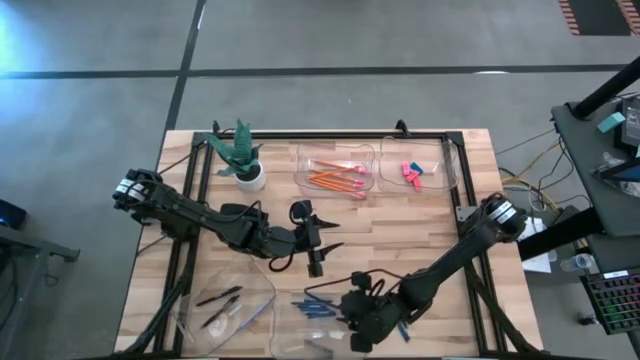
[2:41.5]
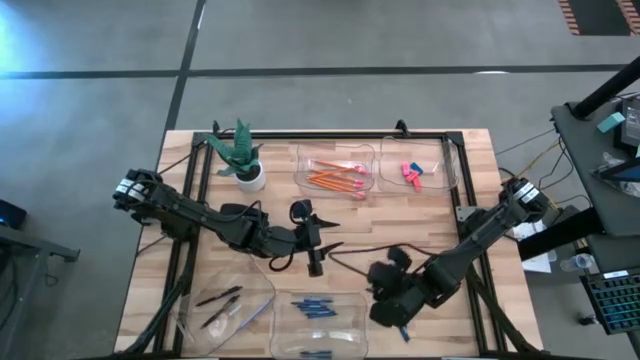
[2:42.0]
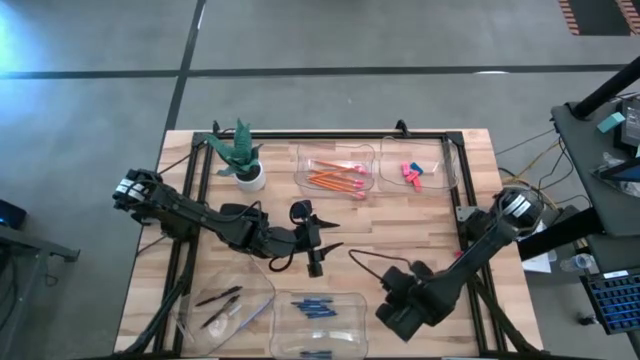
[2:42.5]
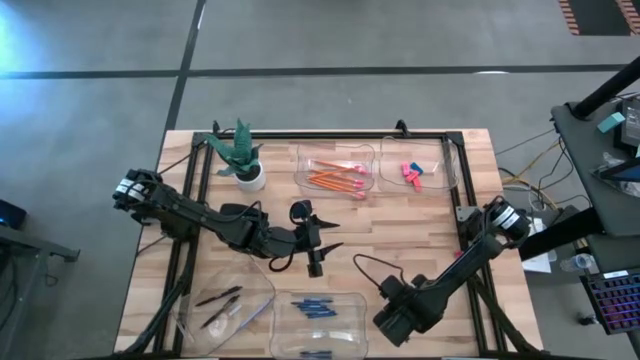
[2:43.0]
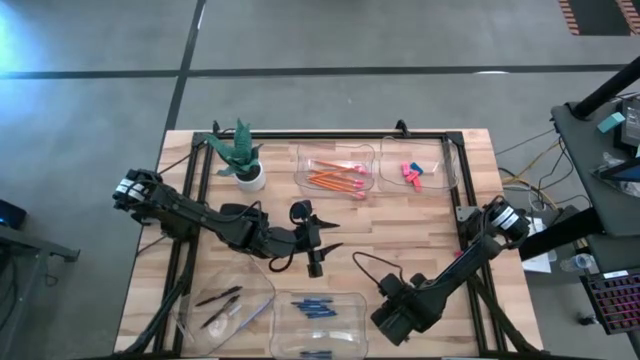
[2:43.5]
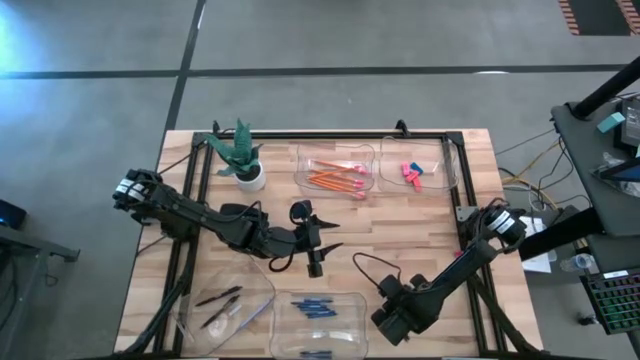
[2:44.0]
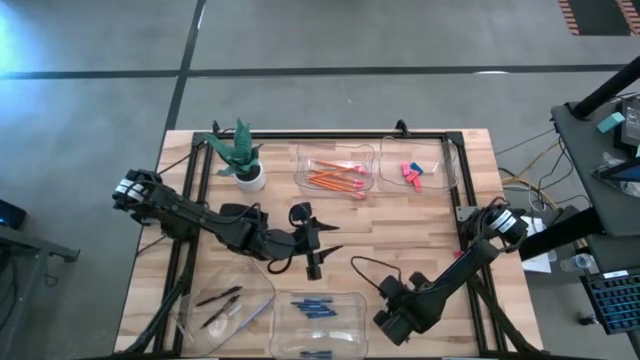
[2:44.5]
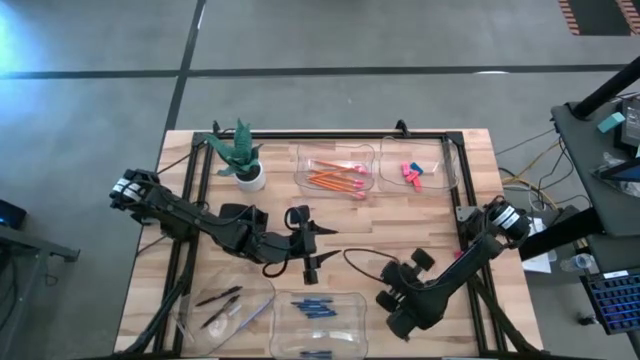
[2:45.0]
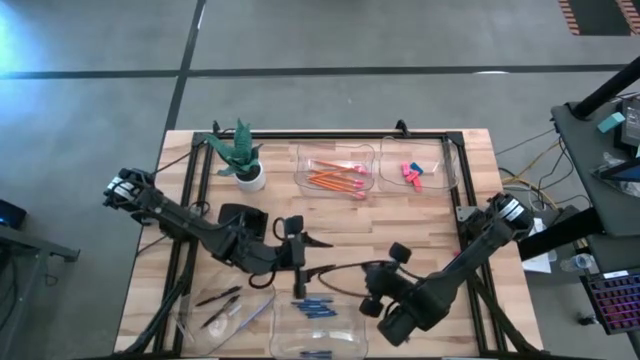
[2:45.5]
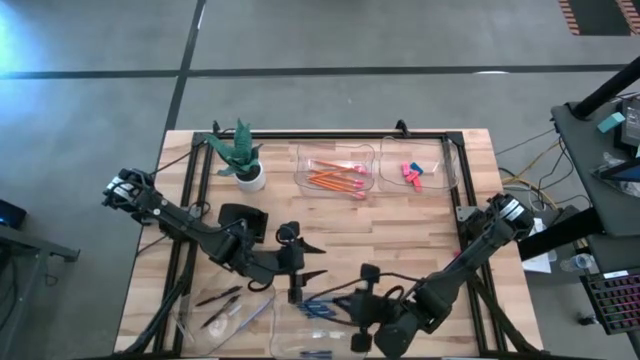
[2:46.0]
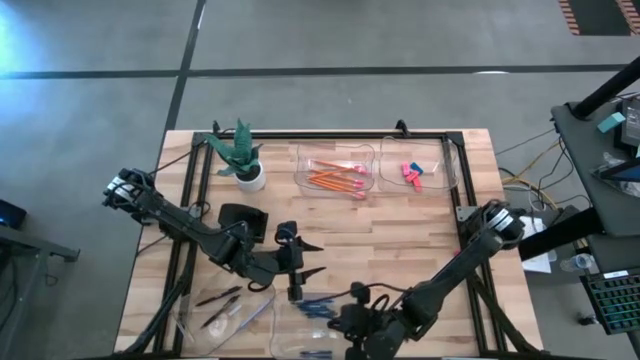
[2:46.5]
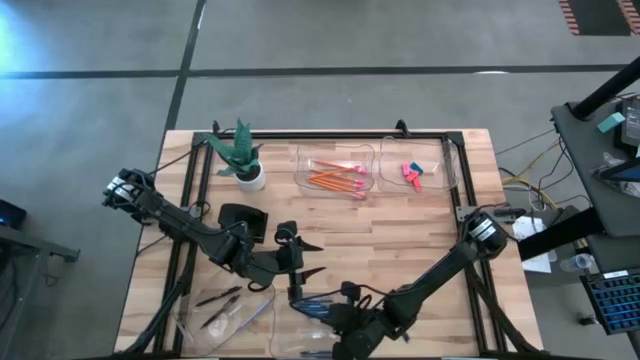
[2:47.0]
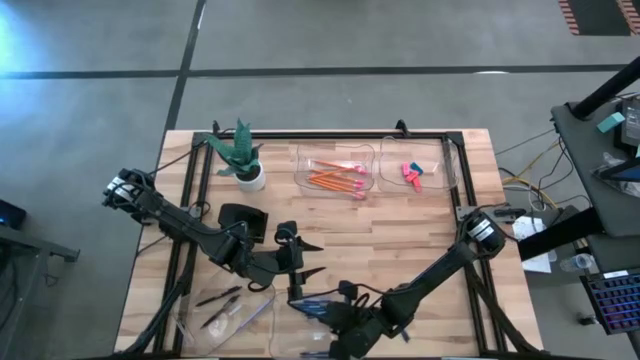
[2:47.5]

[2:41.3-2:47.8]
Task: Sort crayons/erasers/pens/pencils in bins
Put the blue crayon into the bottom right transparent bin

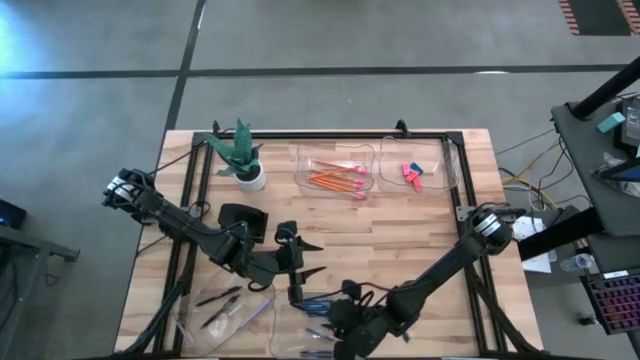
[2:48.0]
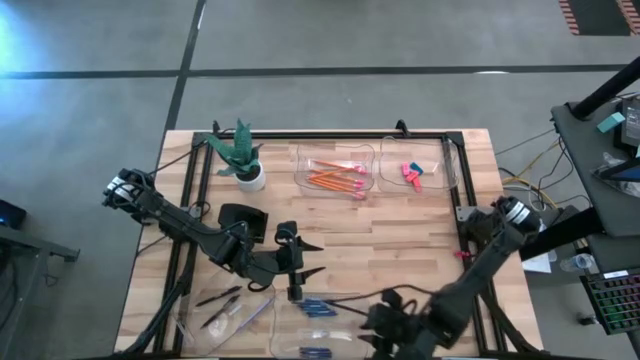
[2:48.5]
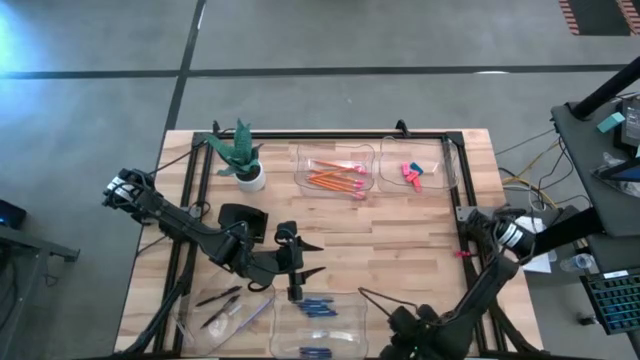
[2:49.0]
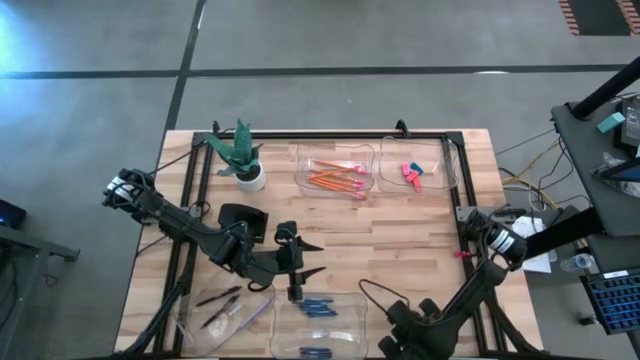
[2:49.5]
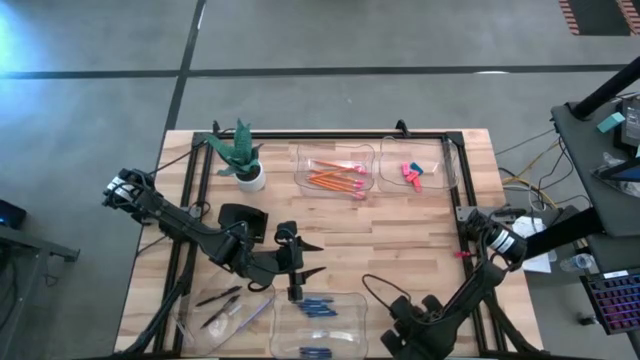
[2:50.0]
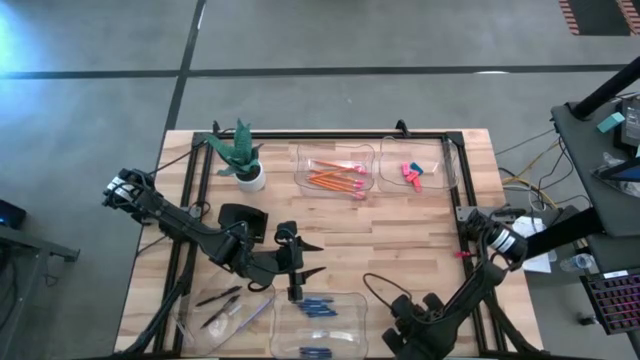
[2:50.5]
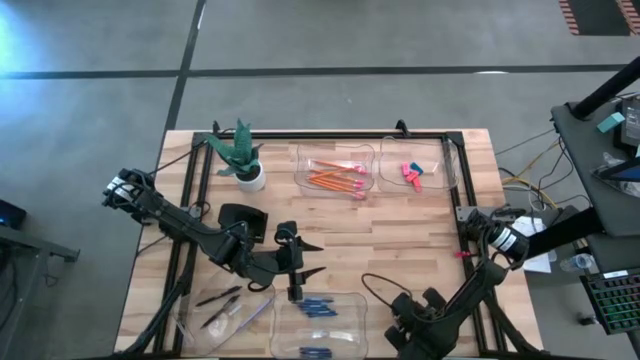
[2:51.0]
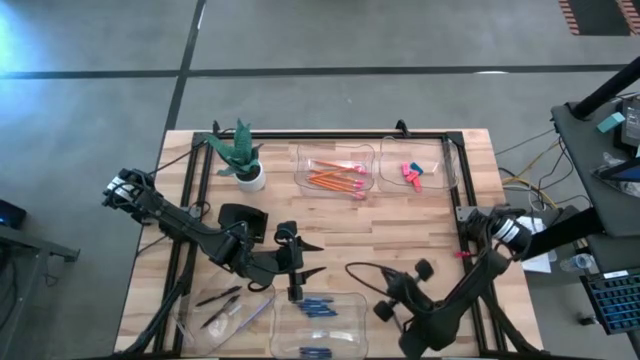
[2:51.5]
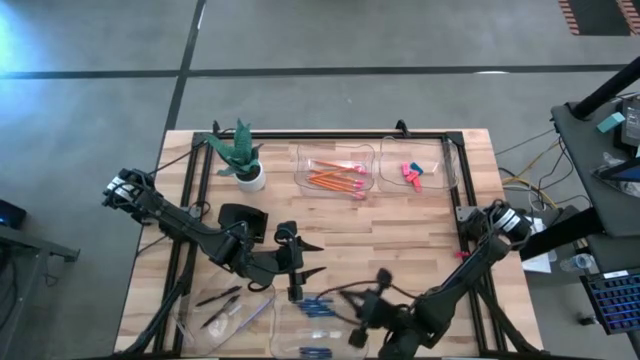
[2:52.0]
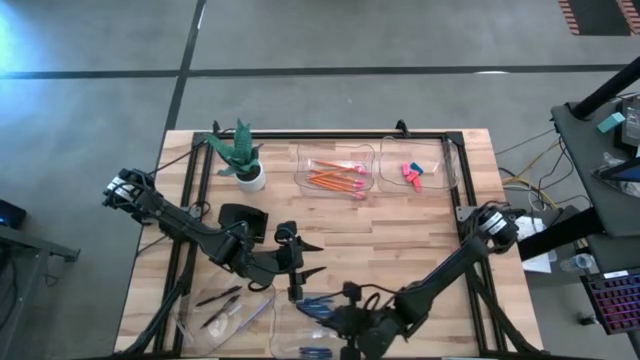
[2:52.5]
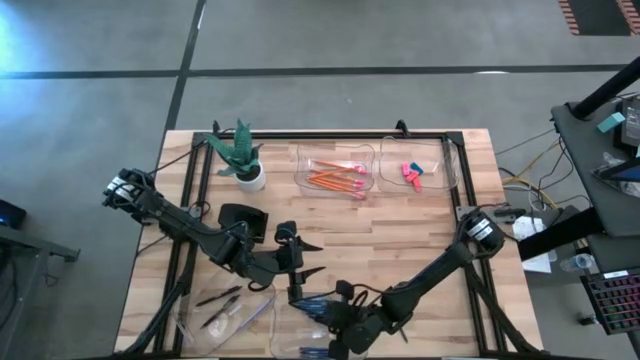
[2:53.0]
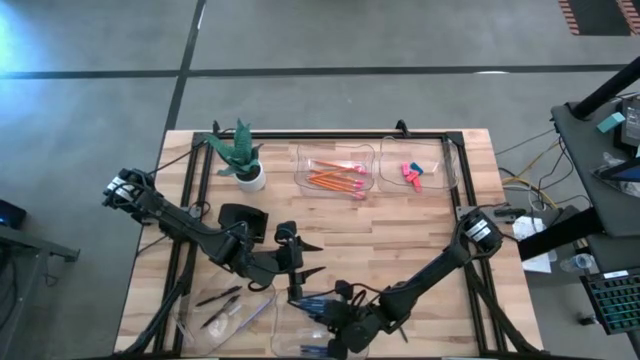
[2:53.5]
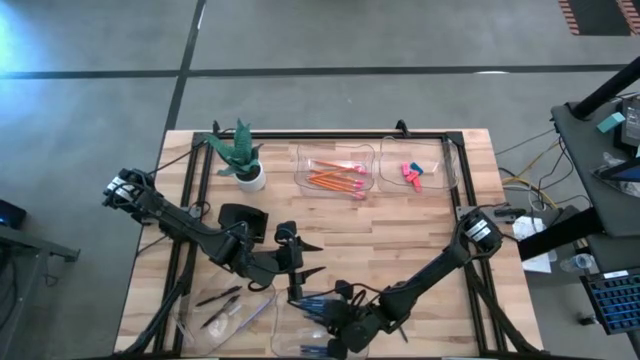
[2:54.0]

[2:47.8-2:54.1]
Put the blue crayon into the bottom right transparent bin

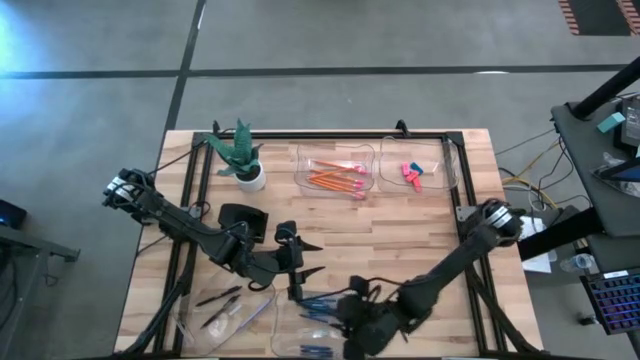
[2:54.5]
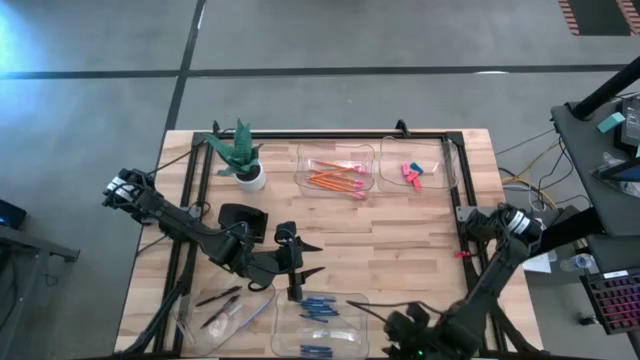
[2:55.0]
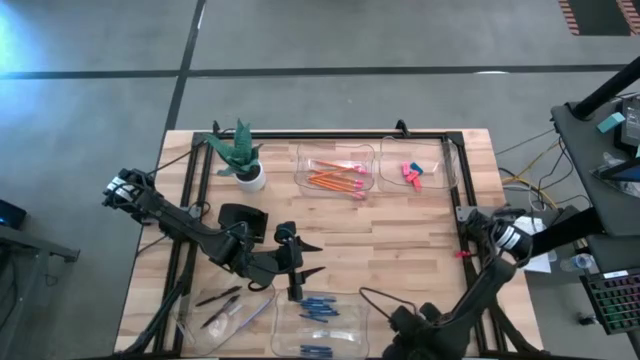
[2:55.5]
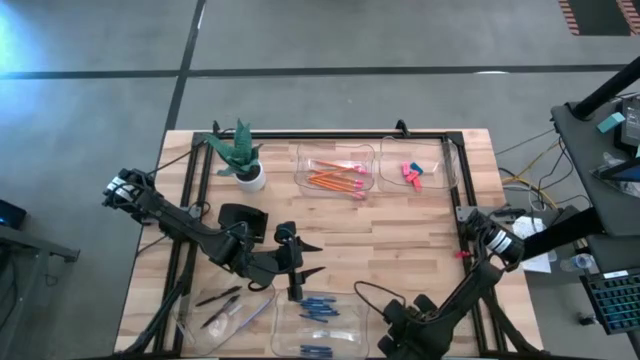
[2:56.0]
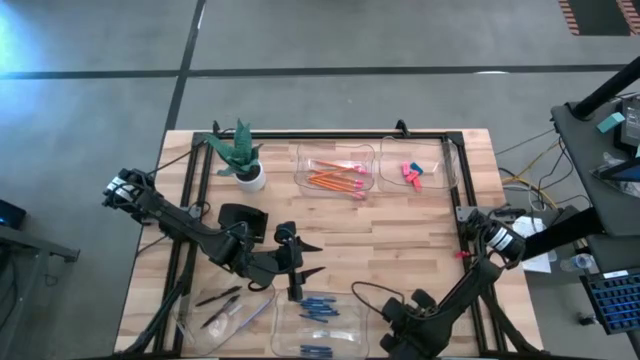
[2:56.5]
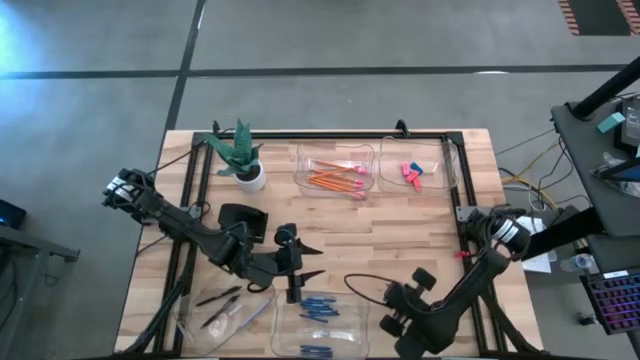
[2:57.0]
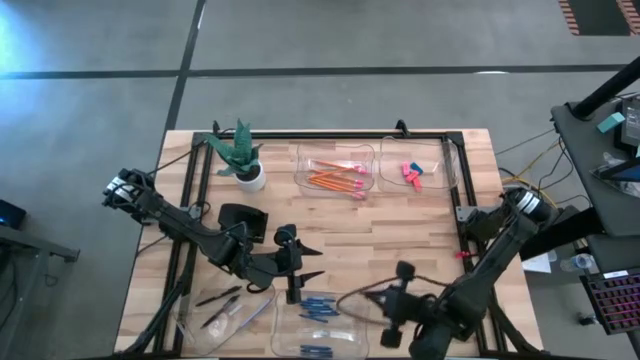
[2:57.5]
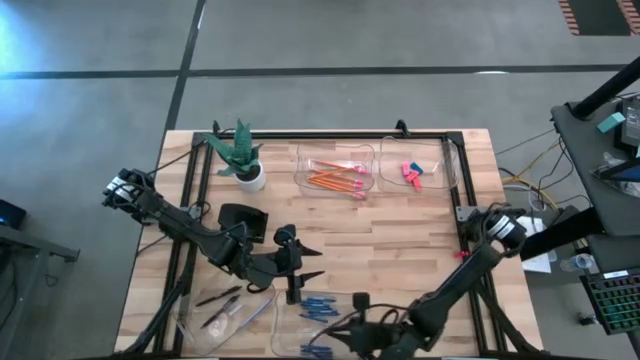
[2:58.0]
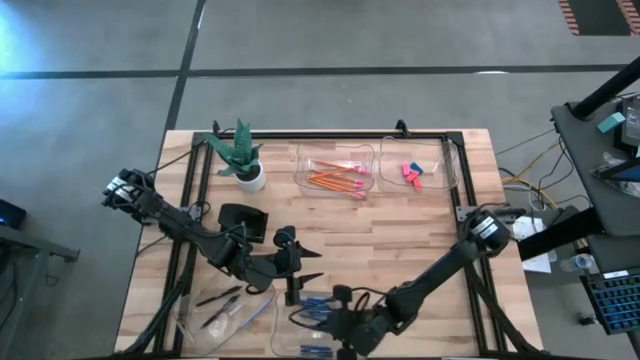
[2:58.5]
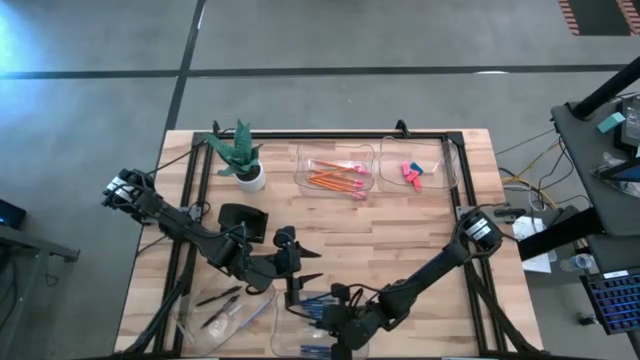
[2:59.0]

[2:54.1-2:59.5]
Put the blue crayon into the bottom right transparent bin

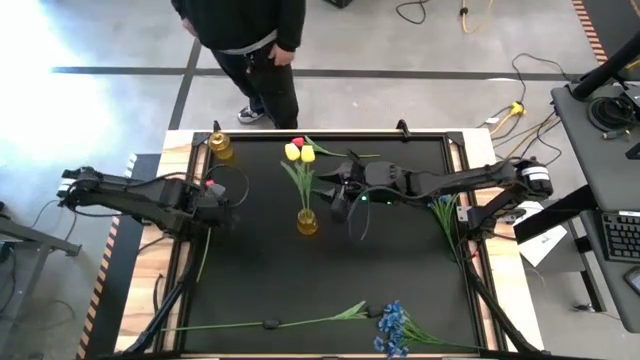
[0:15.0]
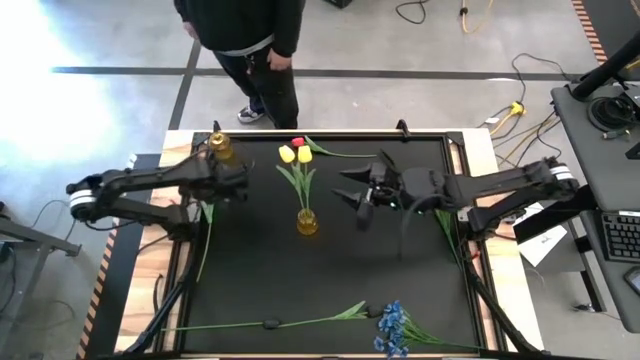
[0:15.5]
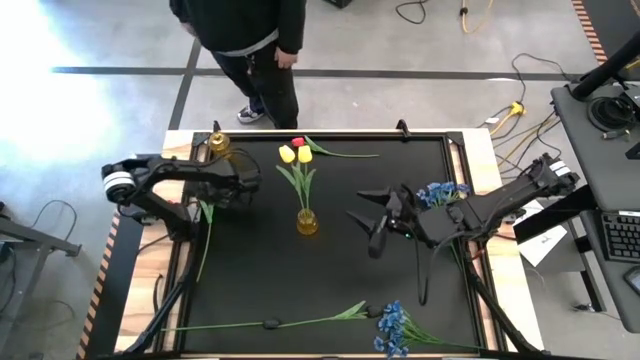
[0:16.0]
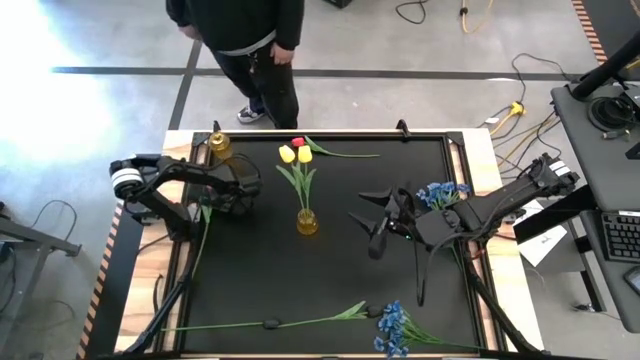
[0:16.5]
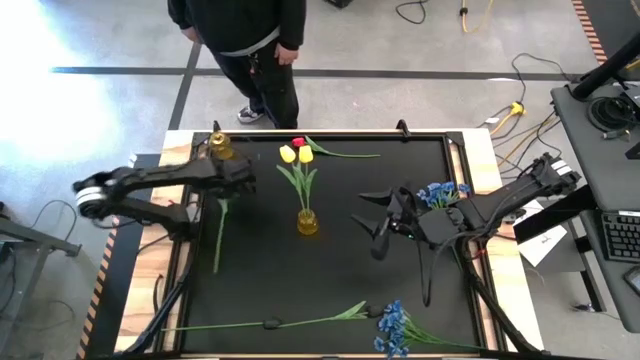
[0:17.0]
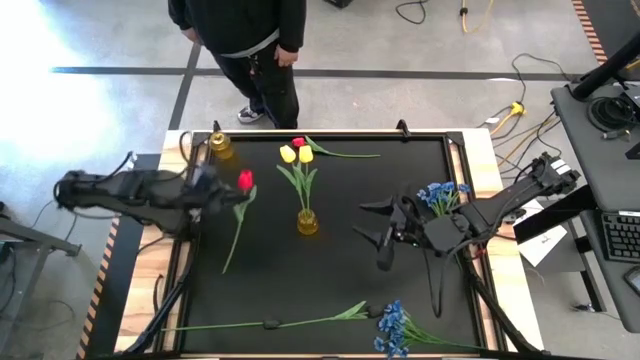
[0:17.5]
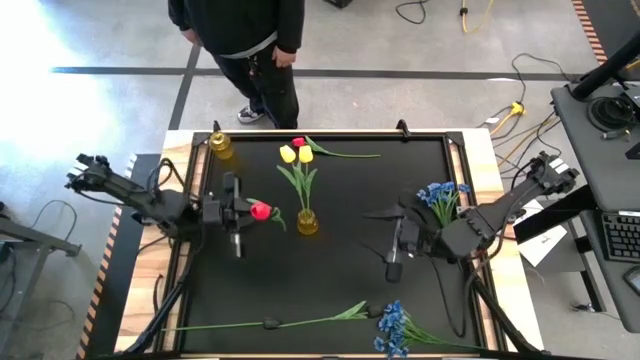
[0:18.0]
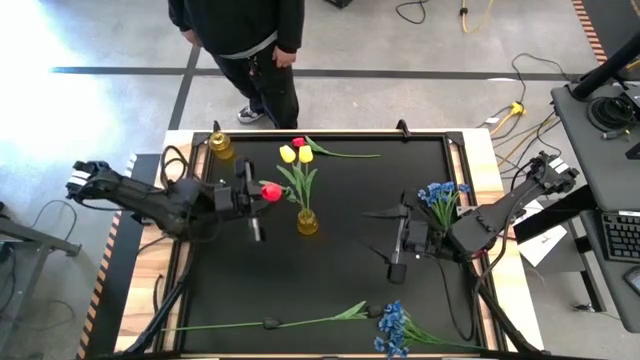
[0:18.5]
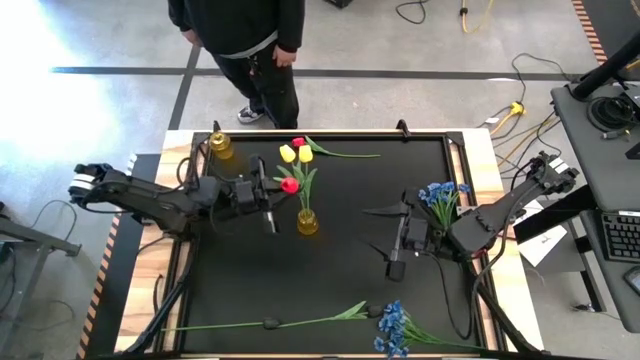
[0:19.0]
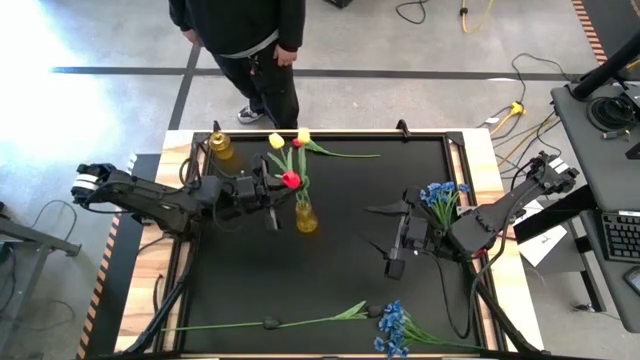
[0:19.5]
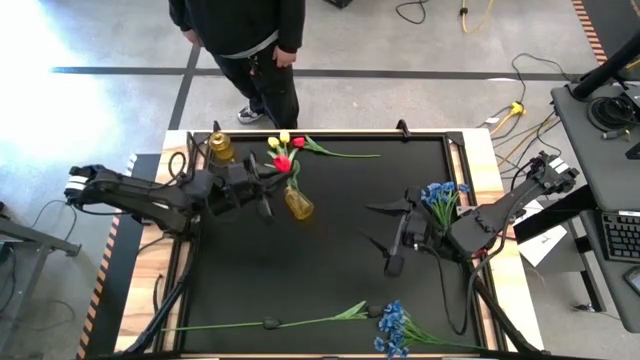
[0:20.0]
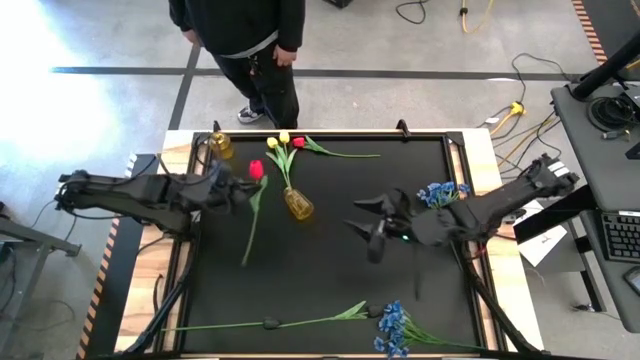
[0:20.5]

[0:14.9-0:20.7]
Task: Sort flowers into vase by color
Put the bottom red tulip into the yellow vase
